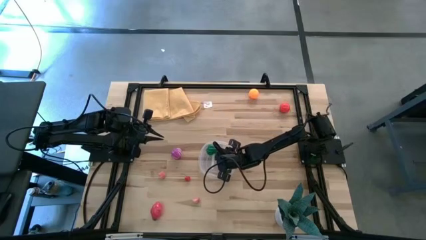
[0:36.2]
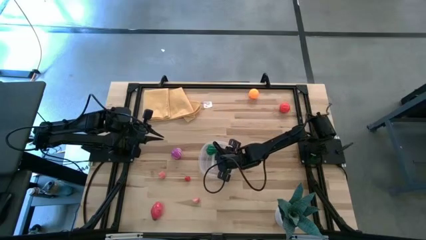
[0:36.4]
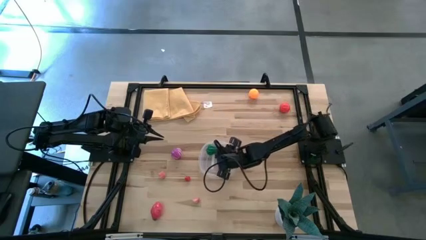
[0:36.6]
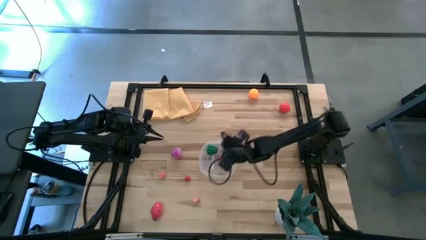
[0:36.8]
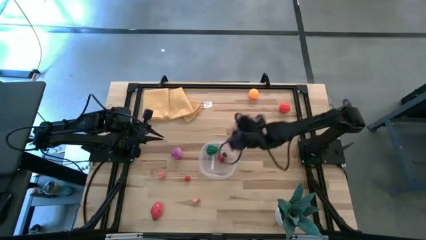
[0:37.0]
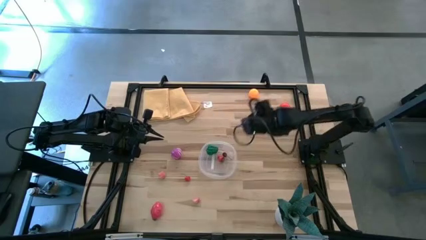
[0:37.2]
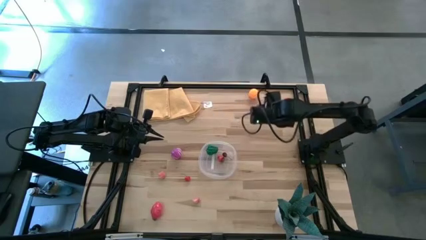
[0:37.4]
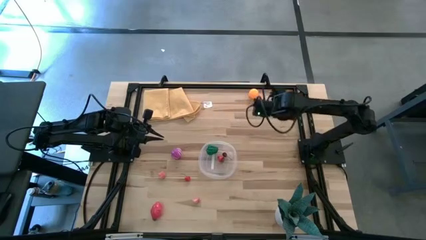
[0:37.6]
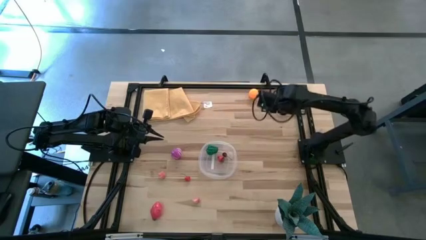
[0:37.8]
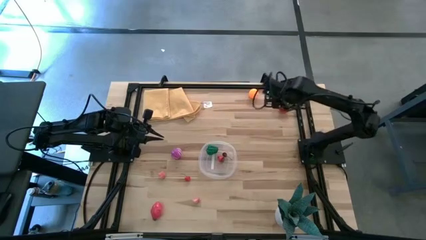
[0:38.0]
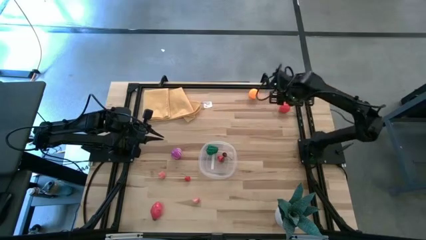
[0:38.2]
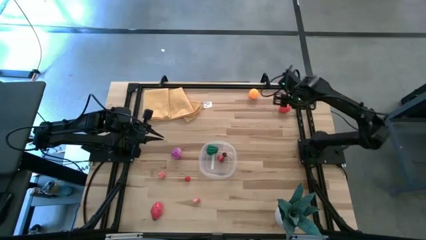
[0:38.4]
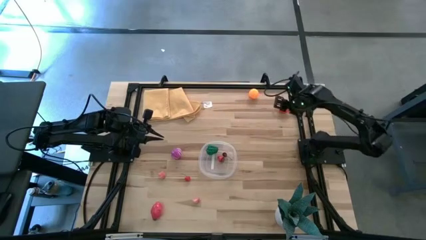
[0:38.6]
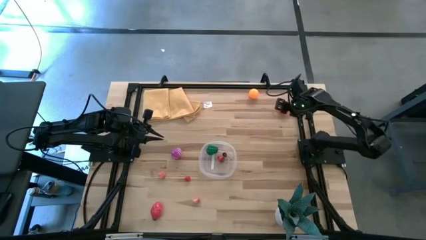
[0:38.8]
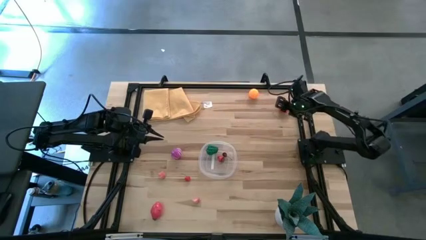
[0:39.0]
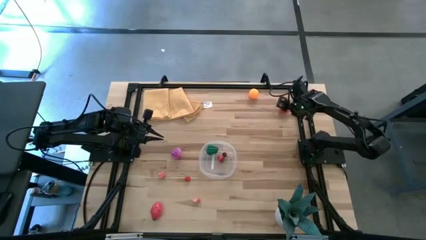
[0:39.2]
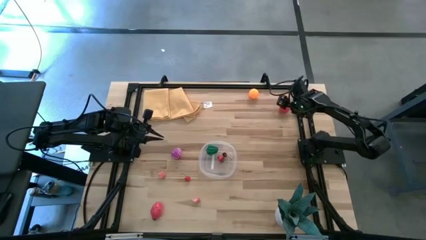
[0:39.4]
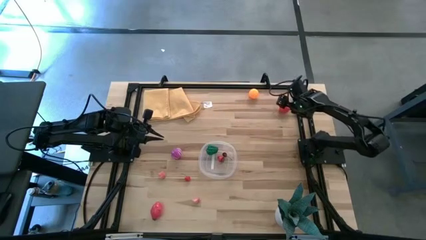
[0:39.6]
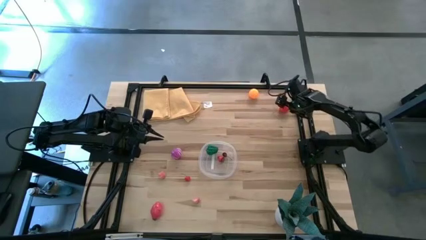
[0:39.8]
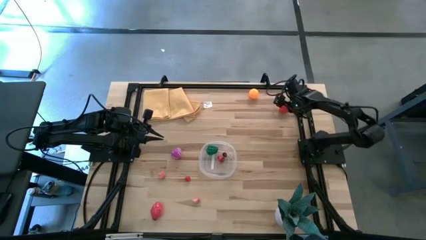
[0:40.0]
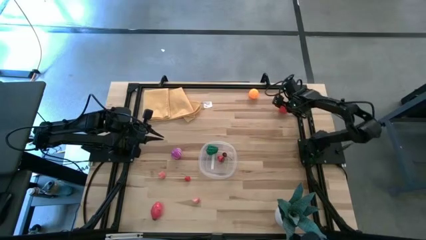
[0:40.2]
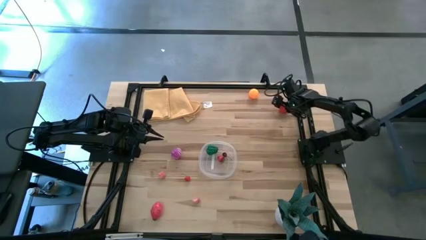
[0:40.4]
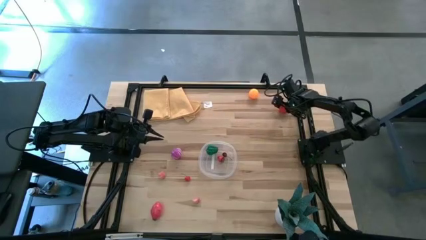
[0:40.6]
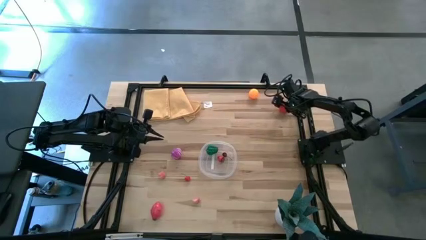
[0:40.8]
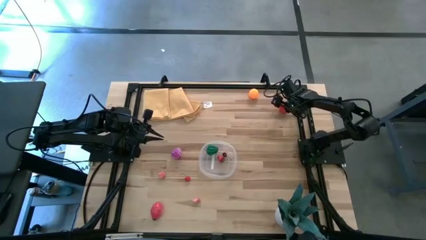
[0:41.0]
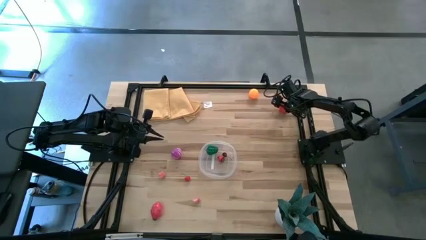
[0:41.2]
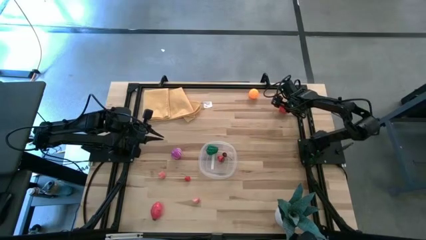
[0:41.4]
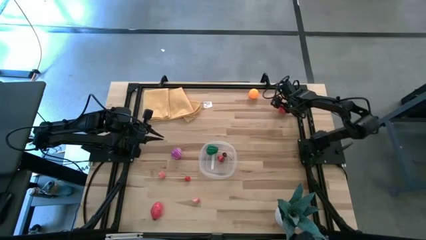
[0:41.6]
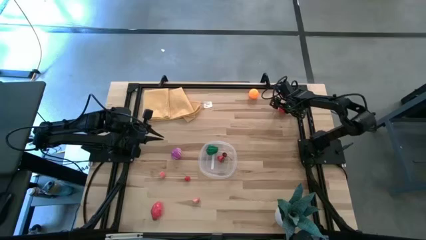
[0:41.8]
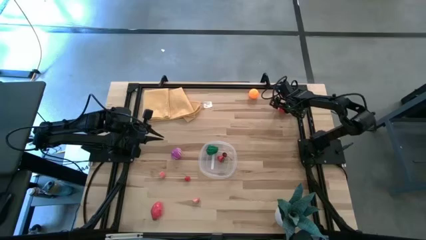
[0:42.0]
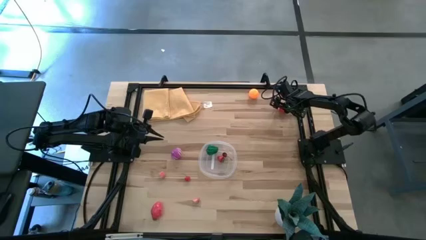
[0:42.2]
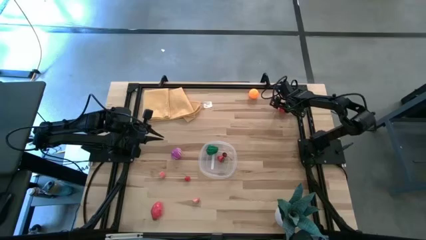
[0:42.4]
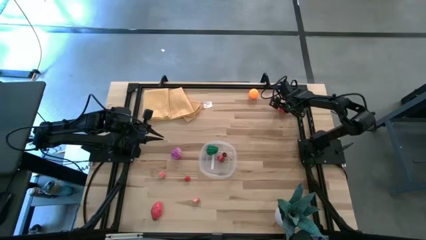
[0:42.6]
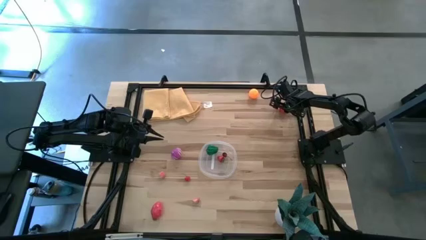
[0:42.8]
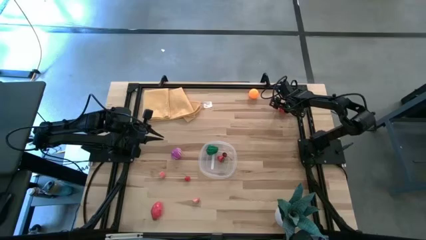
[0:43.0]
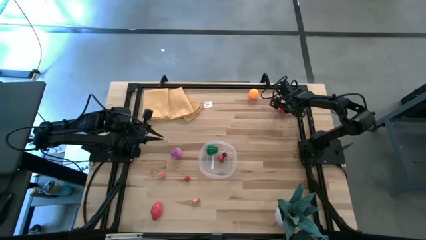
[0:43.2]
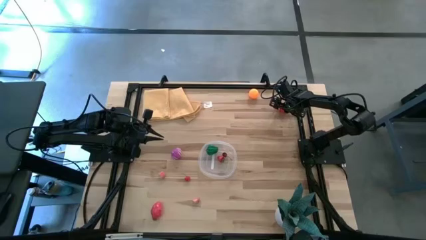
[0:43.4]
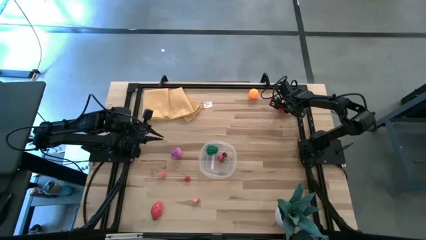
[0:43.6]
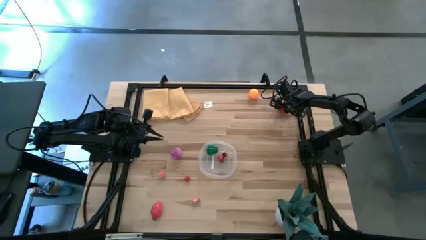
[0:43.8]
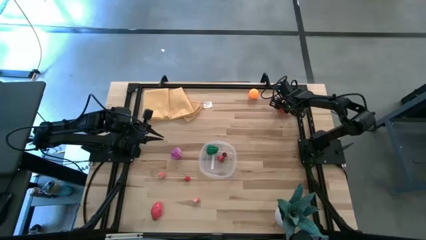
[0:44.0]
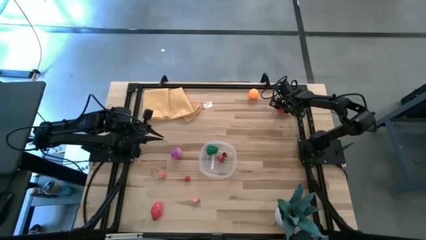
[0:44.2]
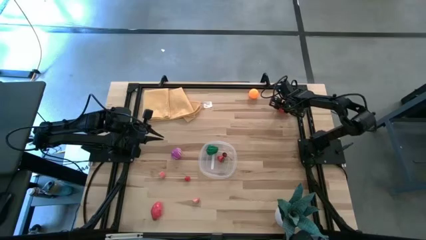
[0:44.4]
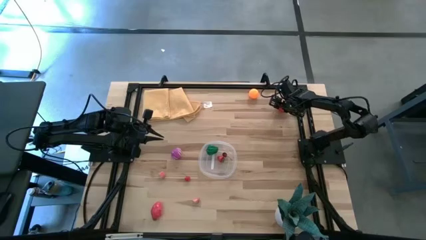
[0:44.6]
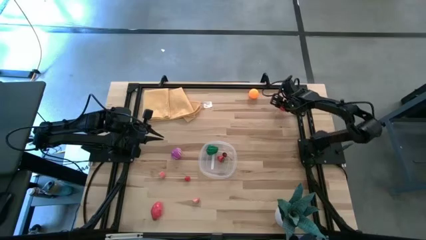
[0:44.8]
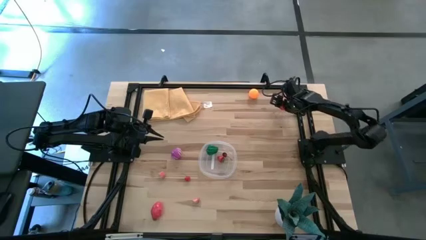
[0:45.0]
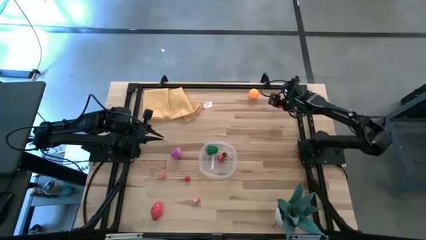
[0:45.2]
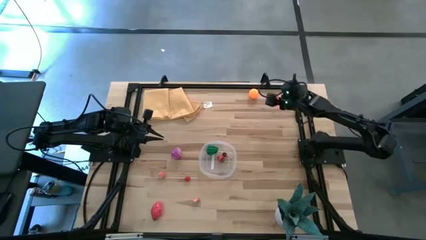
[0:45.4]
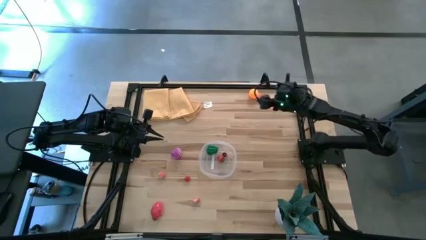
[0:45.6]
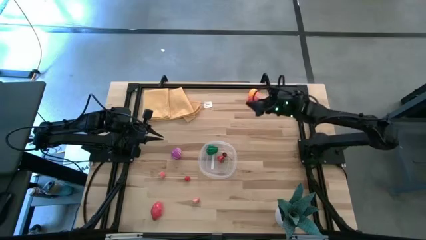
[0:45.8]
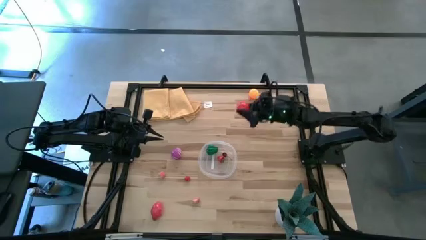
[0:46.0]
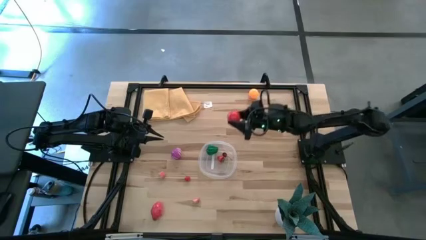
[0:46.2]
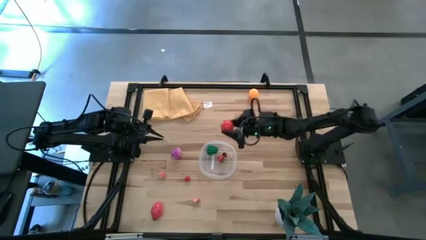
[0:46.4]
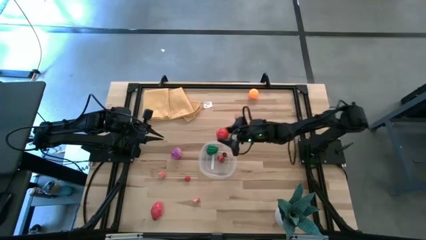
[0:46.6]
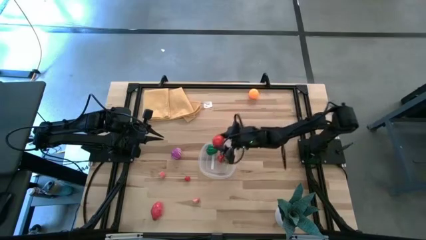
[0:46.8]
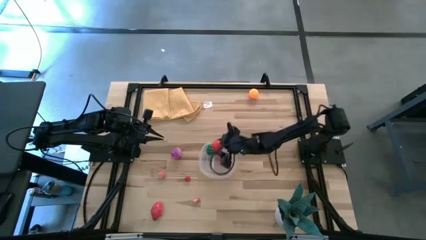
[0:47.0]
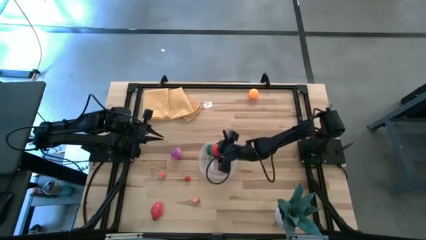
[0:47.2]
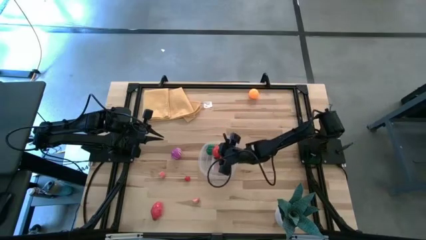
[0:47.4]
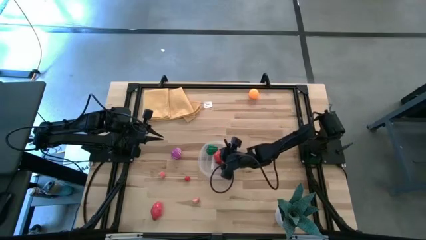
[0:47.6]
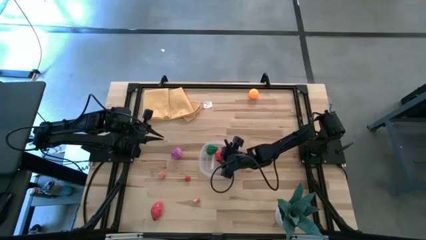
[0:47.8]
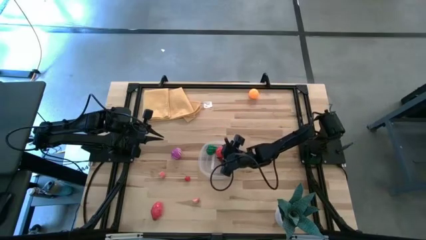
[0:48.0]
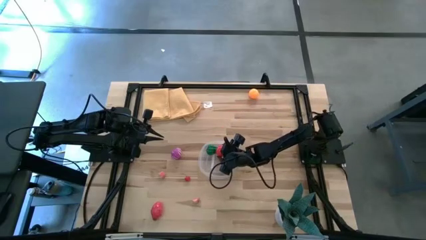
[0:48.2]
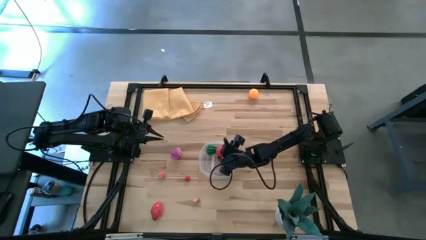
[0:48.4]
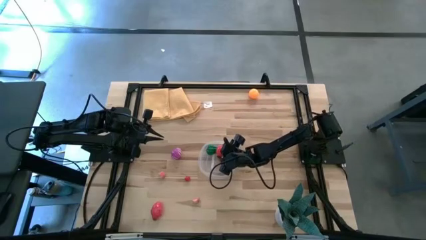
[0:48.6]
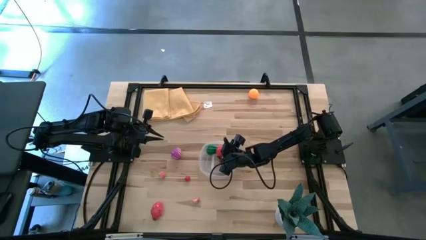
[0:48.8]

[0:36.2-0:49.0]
Task: Pick and placing Produce into tupperware
Put the red tomato into the transparent bin

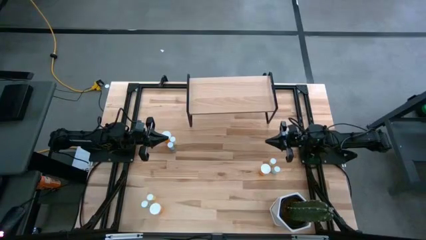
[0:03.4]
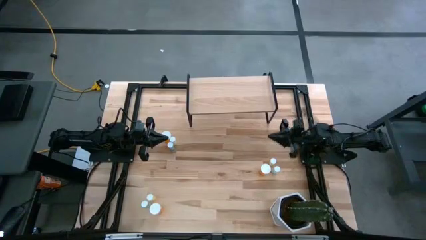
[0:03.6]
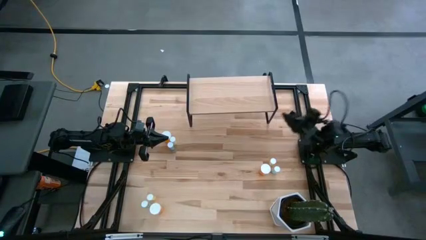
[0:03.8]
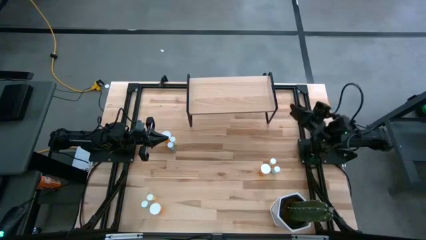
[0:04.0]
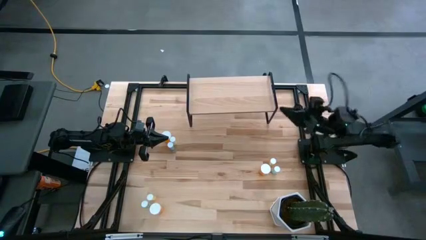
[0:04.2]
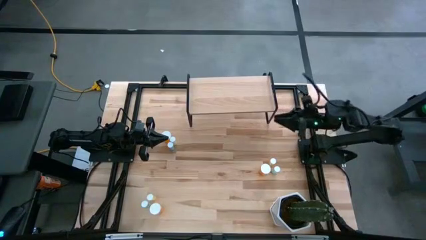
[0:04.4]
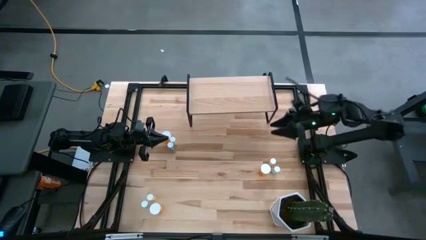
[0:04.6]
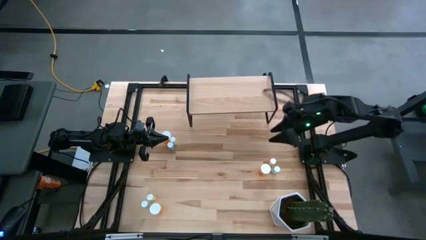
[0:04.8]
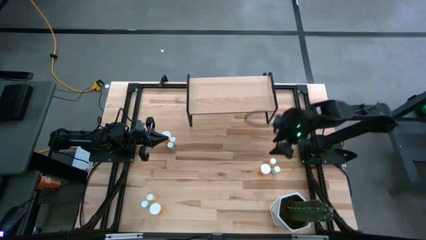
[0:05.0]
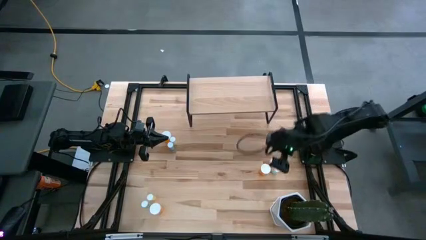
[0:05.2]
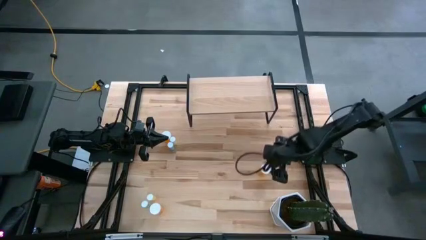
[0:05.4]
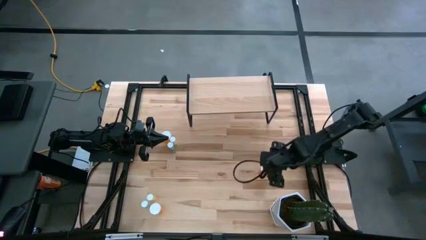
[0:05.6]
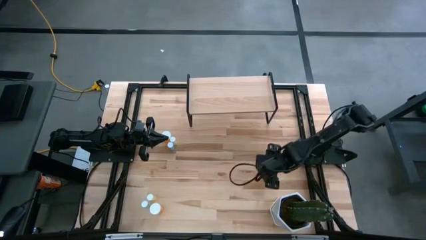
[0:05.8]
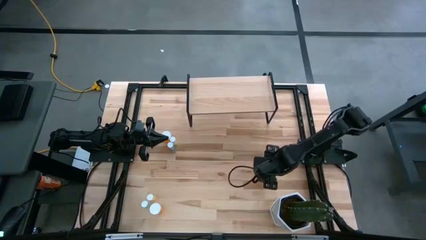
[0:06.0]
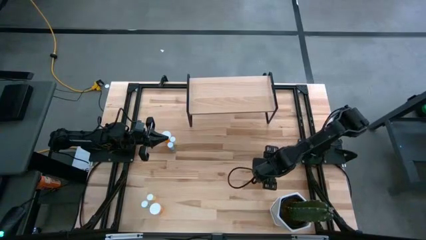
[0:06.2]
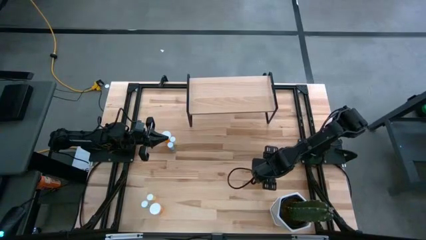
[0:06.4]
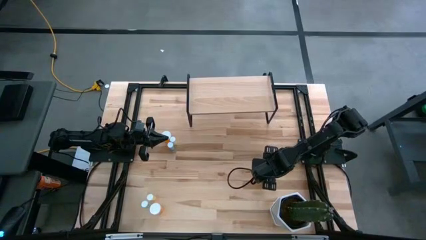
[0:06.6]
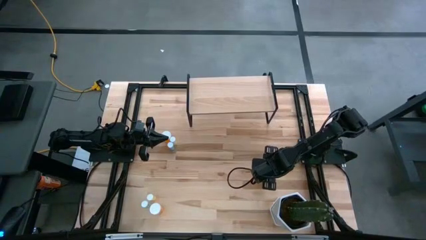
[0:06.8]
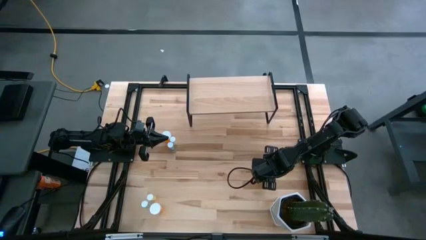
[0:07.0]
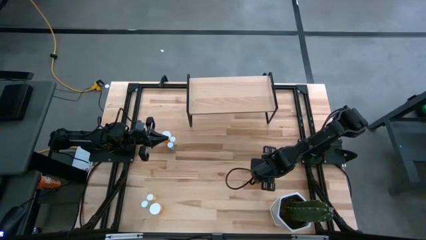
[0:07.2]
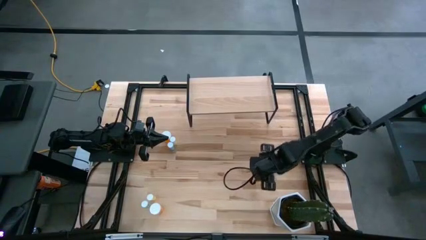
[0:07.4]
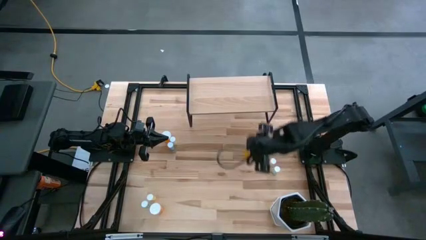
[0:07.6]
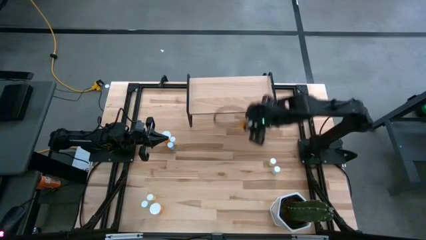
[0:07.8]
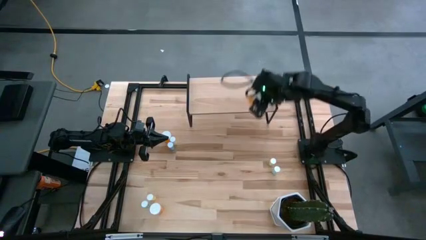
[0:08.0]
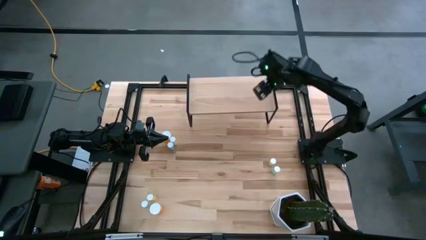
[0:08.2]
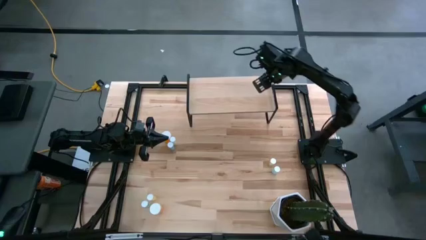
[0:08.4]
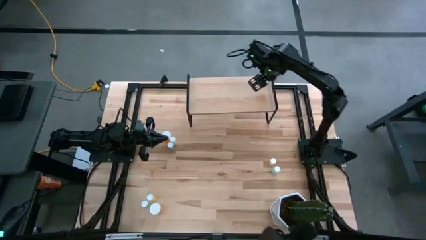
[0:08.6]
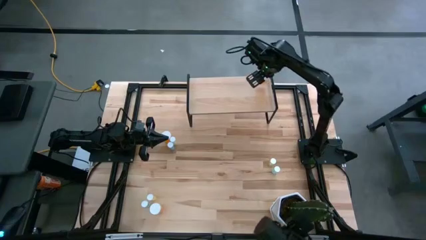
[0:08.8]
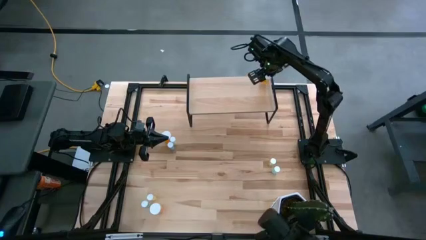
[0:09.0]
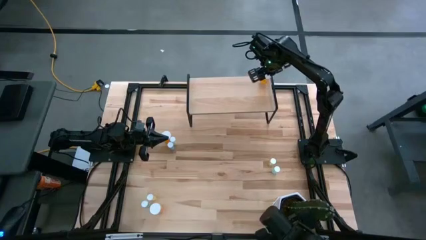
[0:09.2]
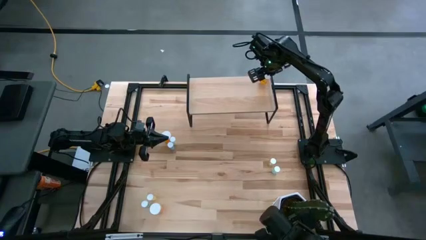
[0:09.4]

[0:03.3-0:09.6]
Task: Pick and place medicine bottles onto shelf by color
Put the middle right orange pill bottle on the shelf
